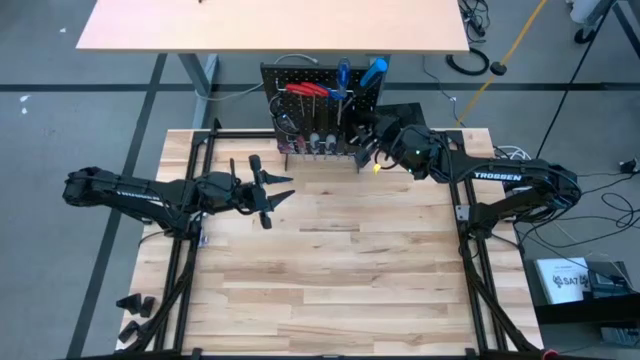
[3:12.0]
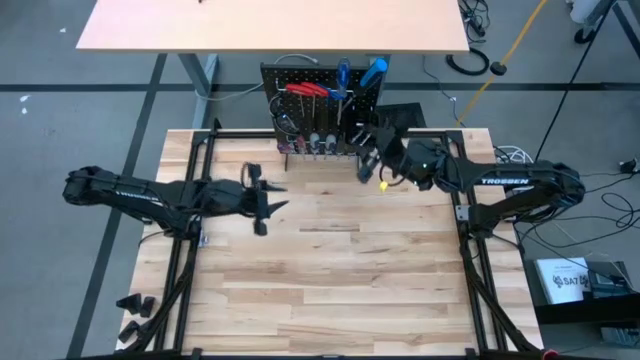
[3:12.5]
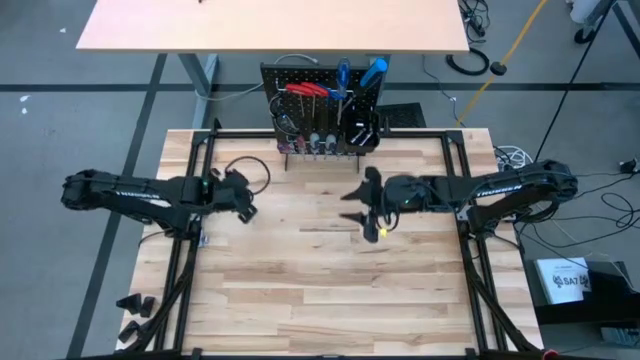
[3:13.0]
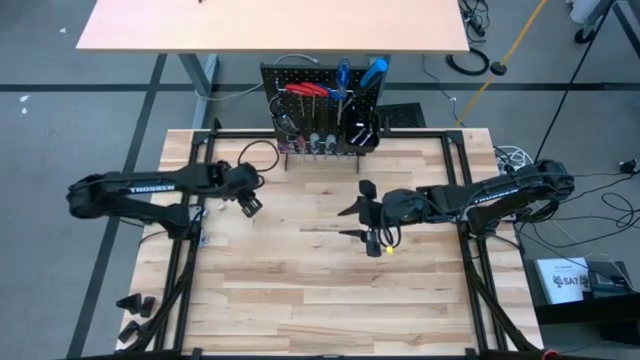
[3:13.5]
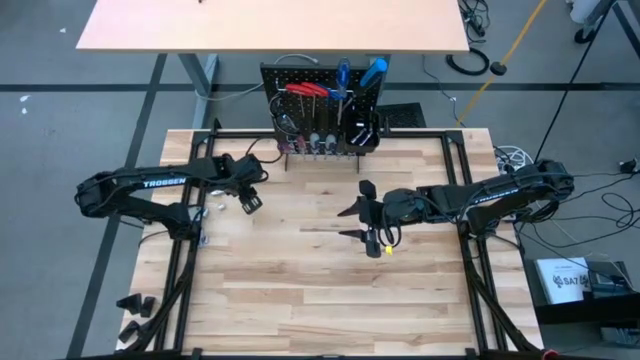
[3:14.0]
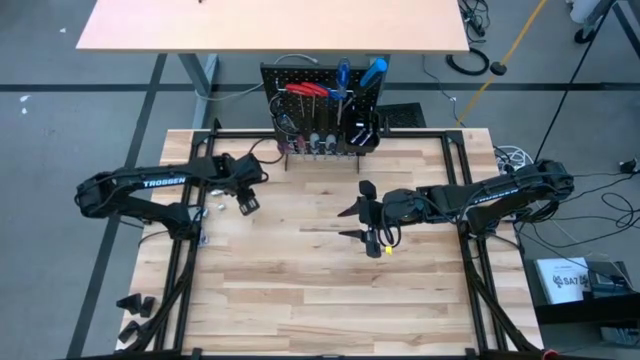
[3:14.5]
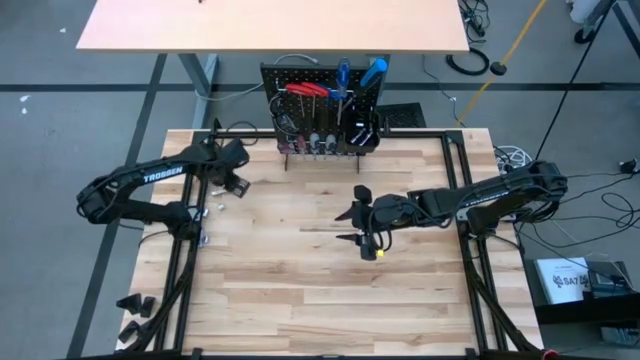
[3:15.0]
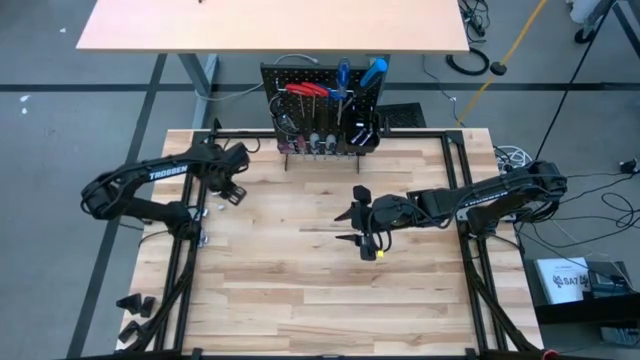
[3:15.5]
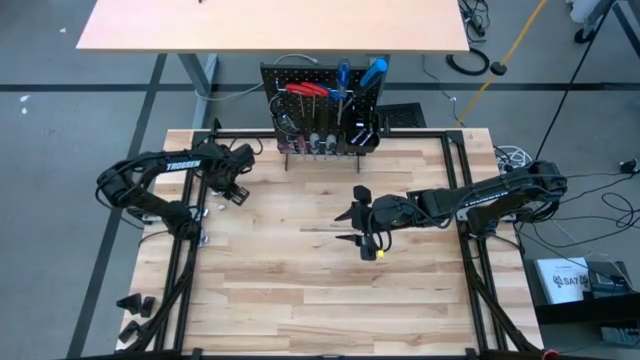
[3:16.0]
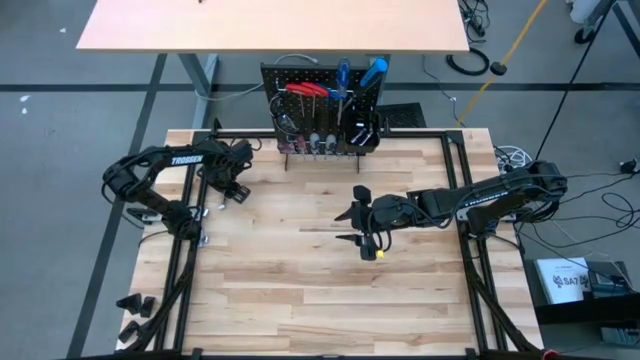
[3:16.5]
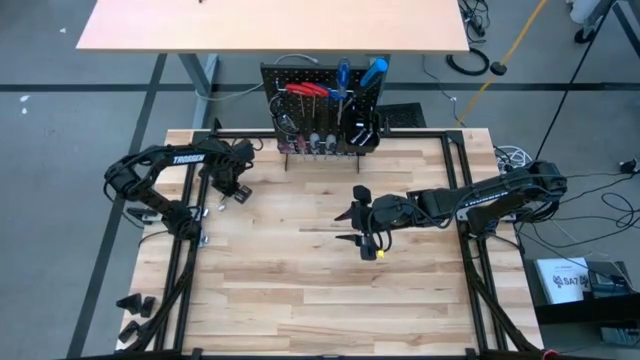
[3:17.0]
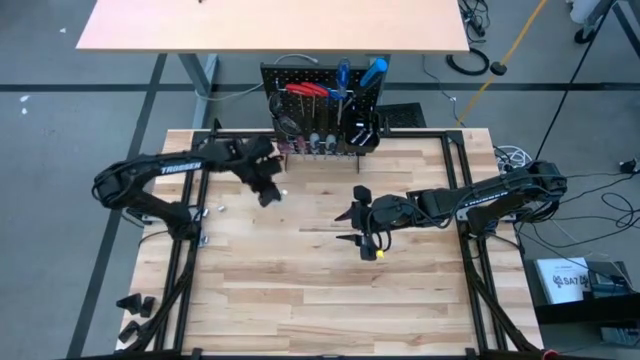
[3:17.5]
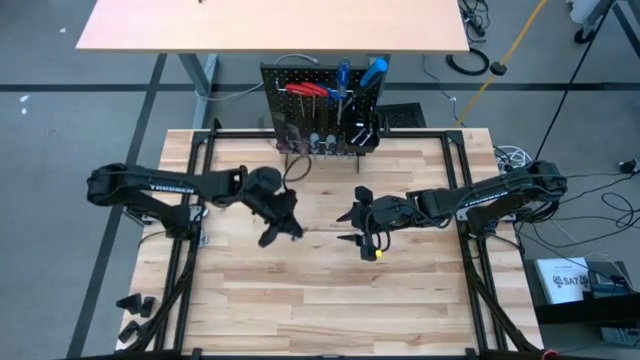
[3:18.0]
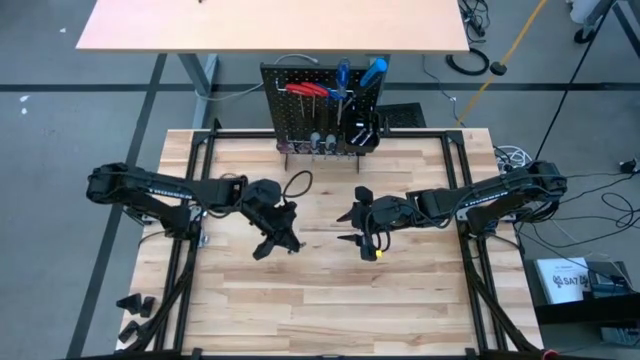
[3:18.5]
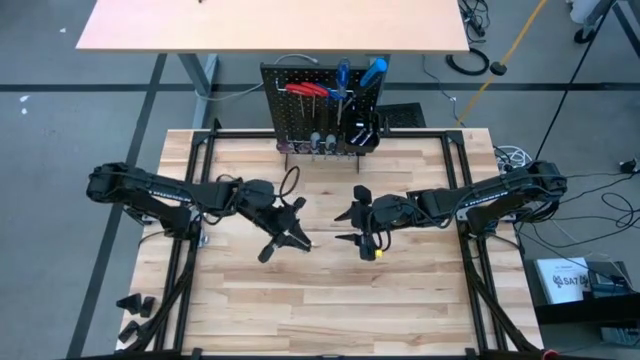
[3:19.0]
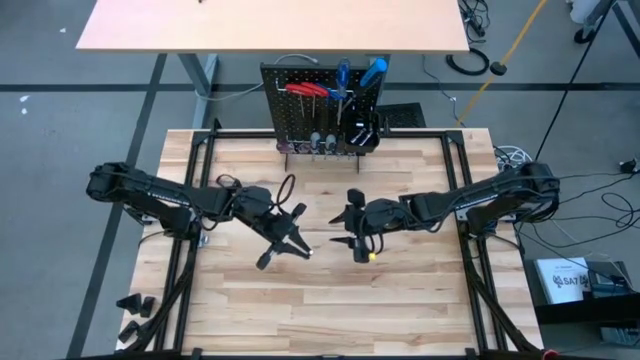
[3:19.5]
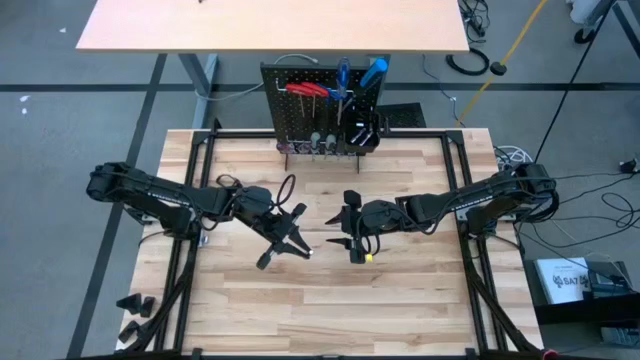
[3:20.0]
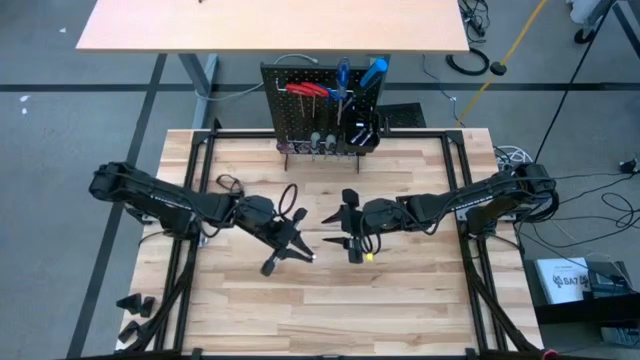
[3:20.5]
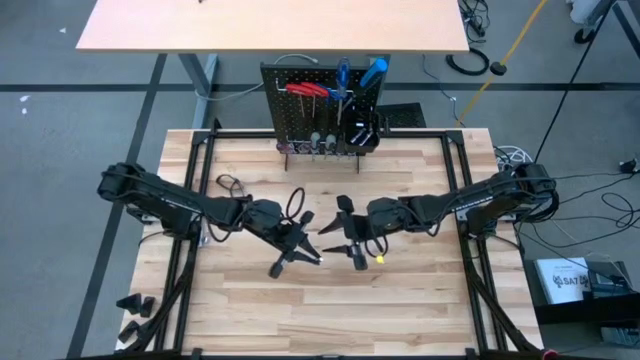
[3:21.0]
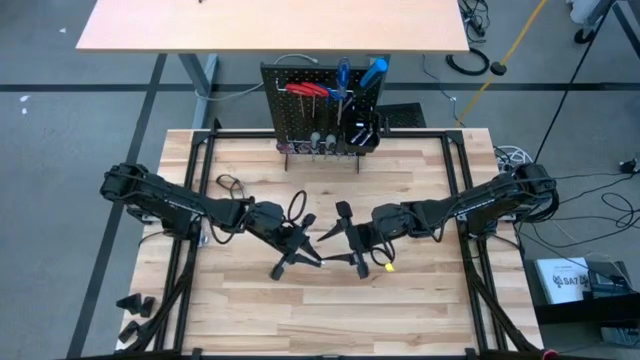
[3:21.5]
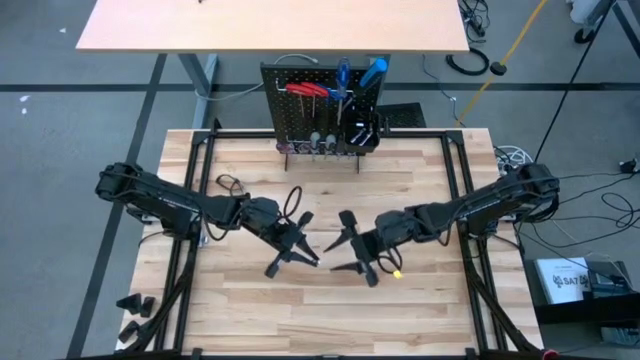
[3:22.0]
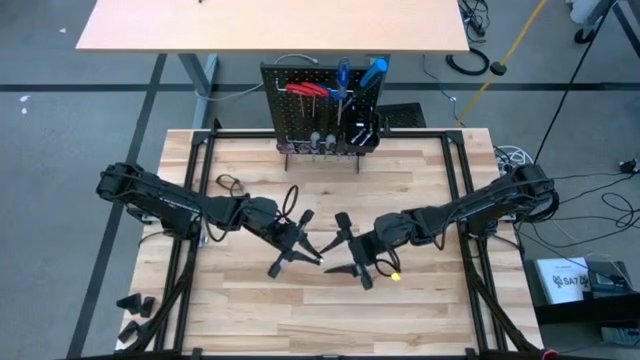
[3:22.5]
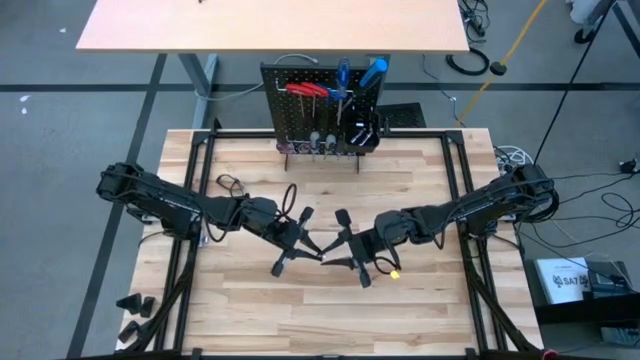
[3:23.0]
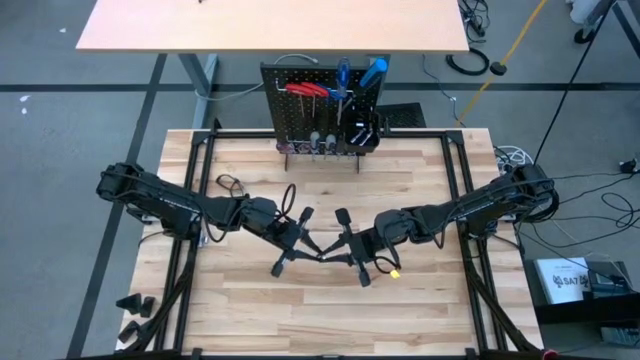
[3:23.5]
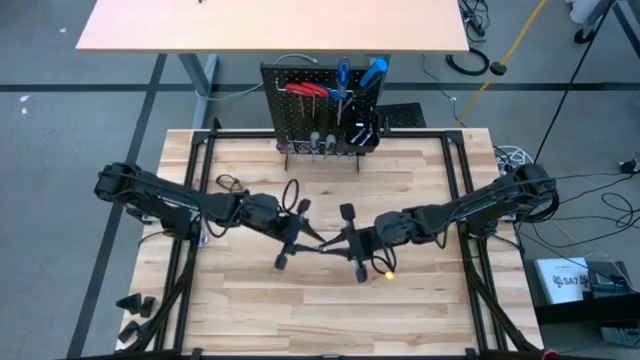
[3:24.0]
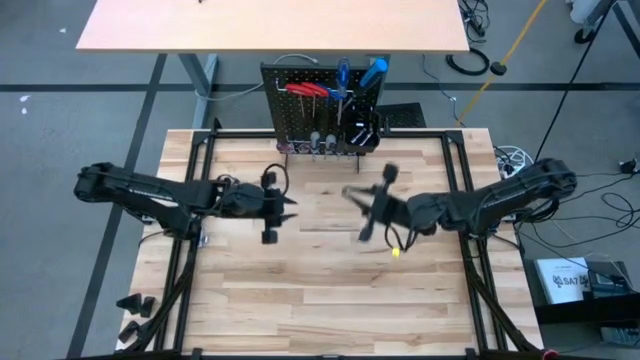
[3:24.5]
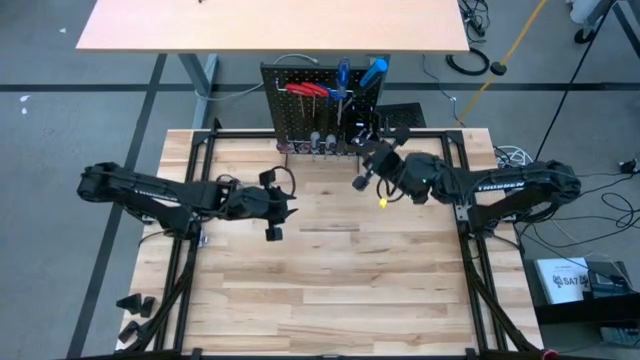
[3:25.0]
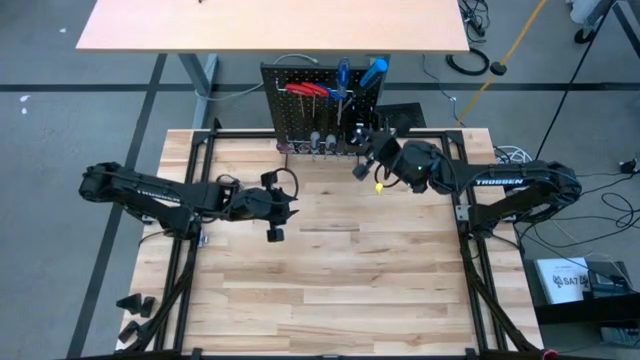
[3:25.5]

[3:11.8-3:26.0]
Task: Hang tools onto peg board
Put the extension bar into the black bin on the peg board

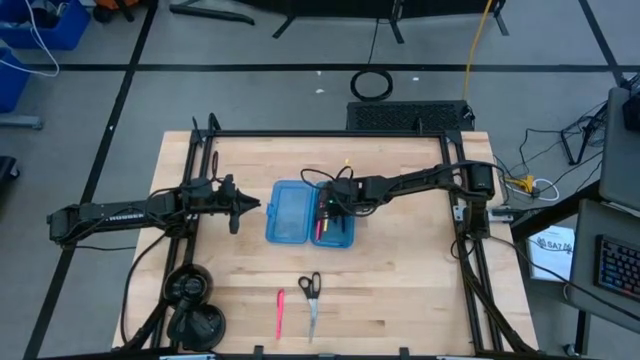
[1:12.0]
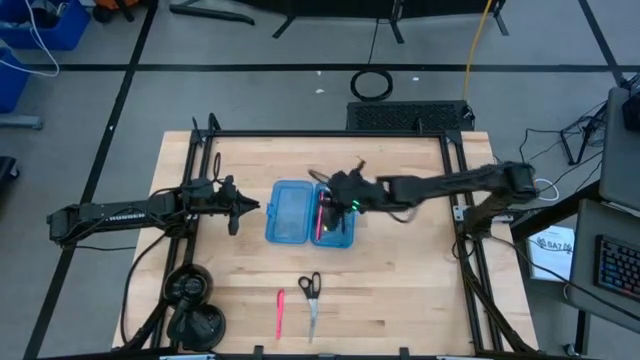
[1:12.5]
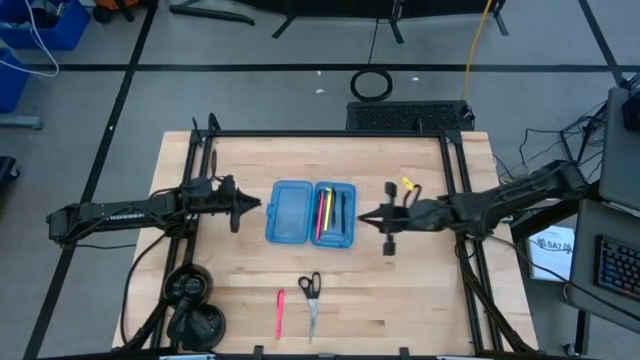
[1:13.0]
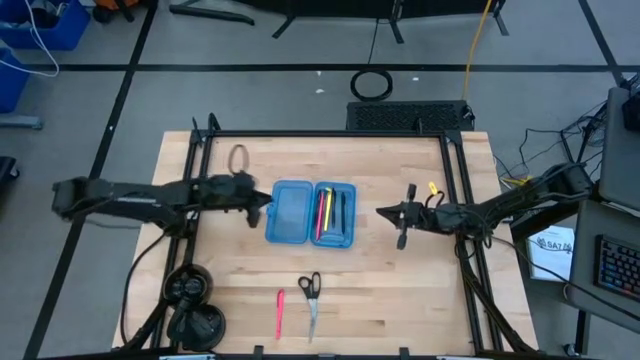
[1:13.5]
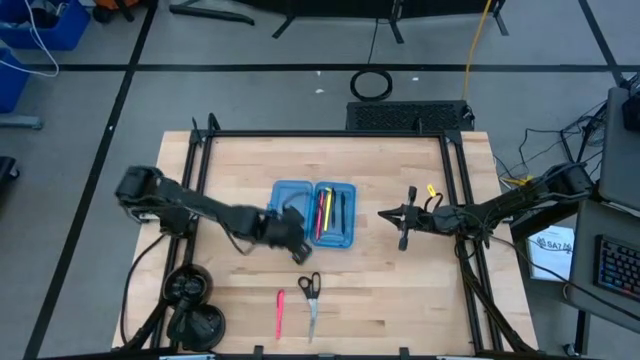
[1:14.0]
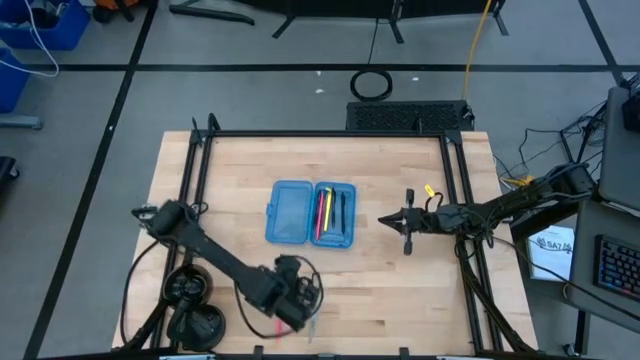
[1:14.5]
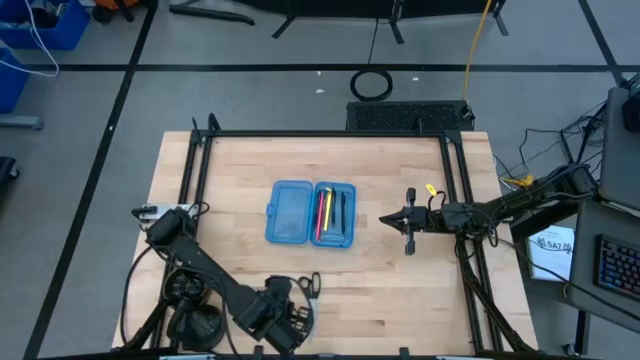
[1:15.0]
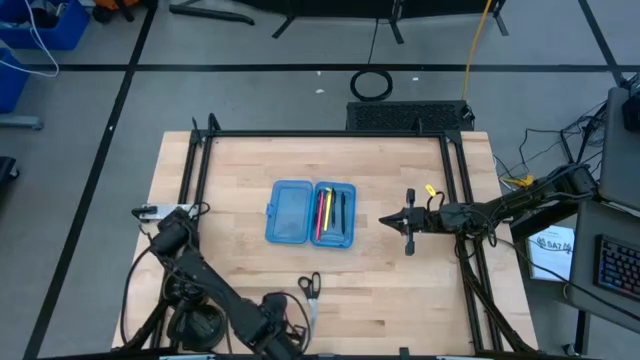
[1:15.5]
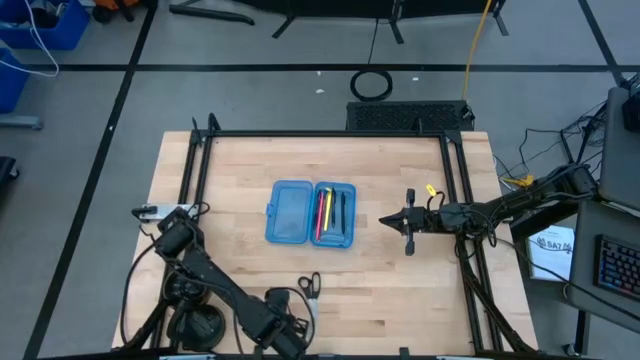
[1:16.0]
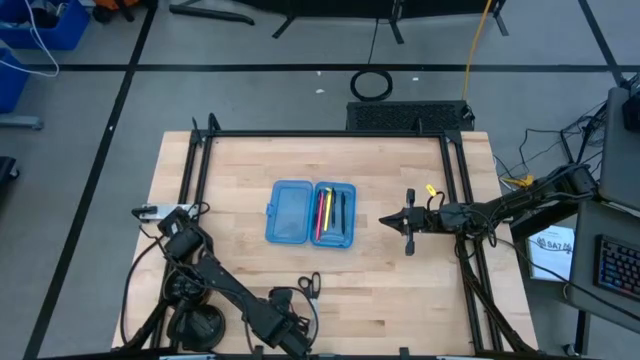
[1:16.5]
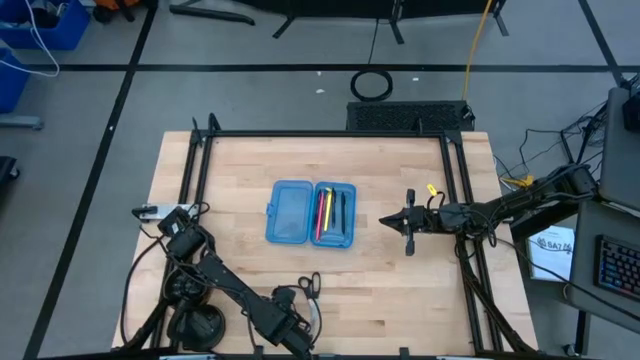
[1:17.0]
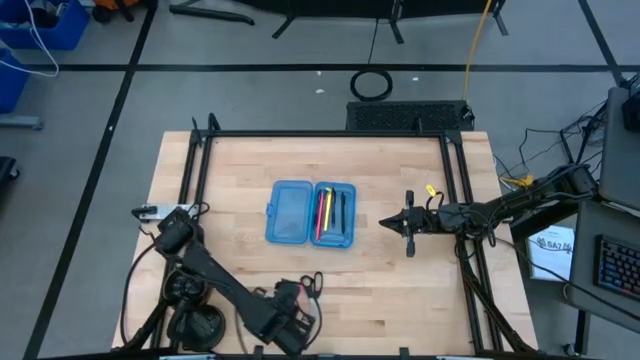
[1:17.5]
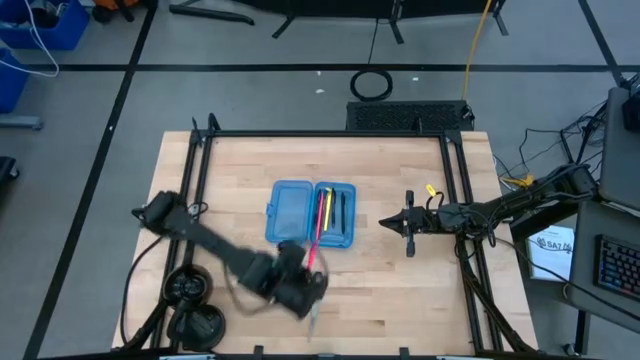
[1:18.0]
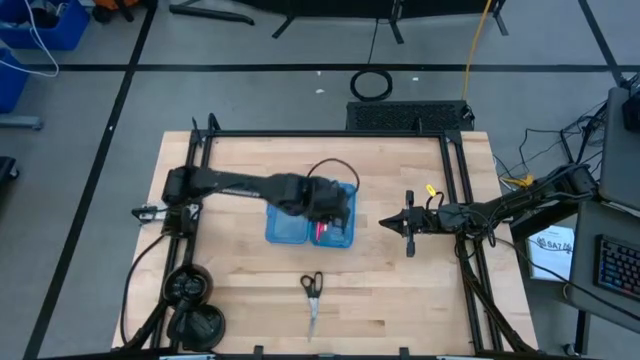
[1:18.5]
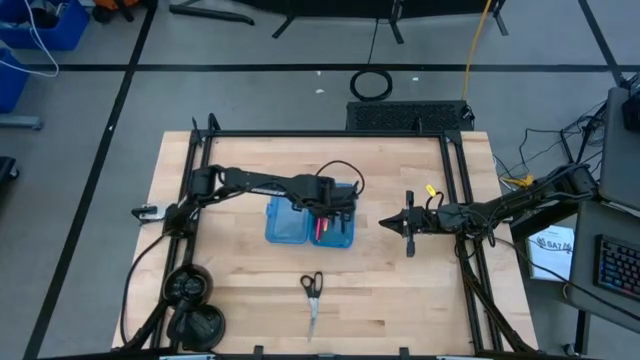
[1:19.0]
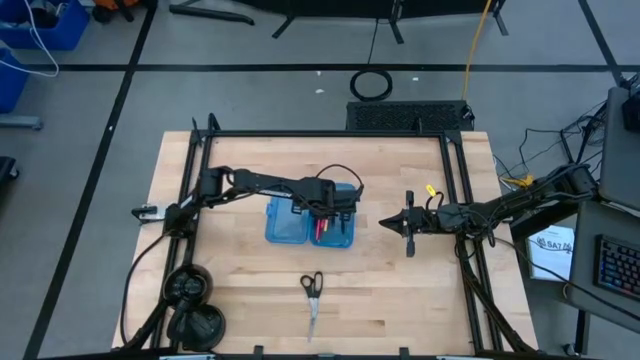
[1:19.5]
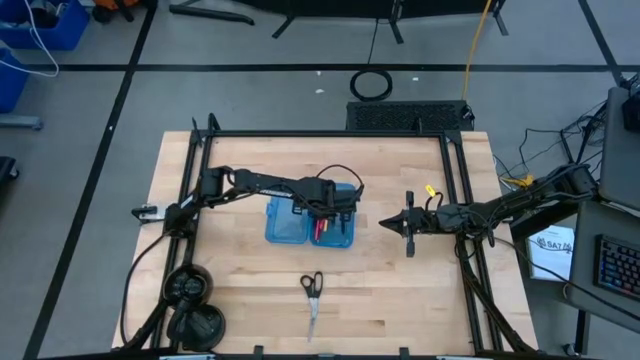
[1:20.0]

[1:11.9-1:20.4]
Task: Pick & place school supplies into a supply box
Put the pink pen into the blue supply box
